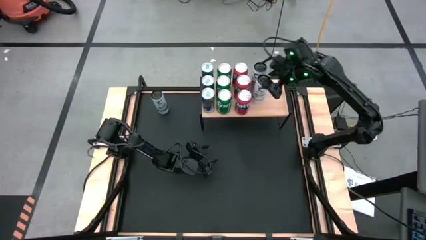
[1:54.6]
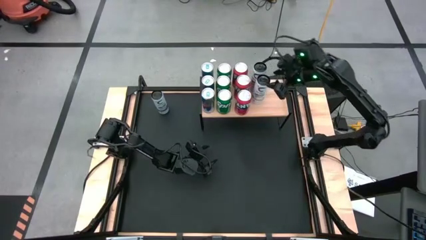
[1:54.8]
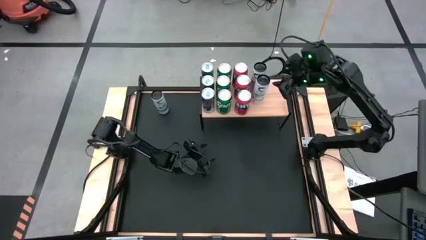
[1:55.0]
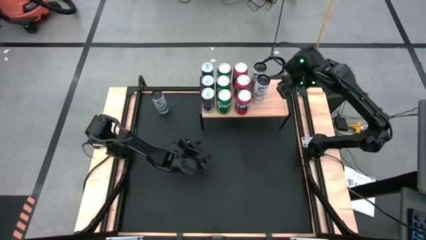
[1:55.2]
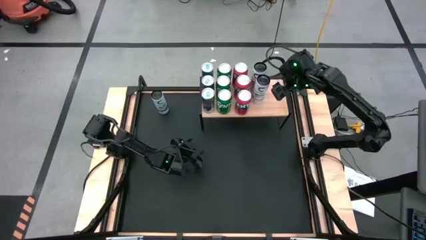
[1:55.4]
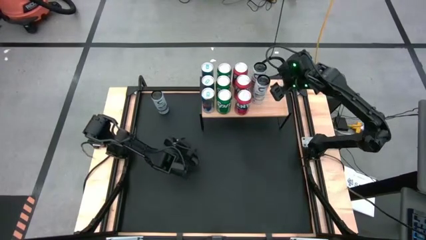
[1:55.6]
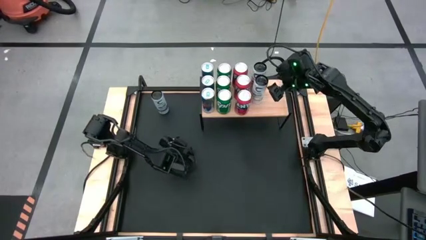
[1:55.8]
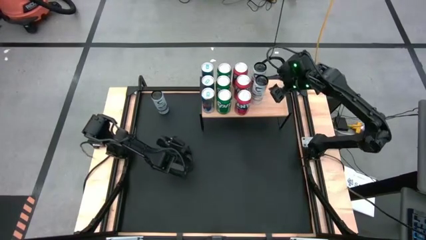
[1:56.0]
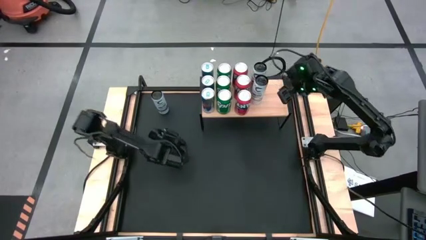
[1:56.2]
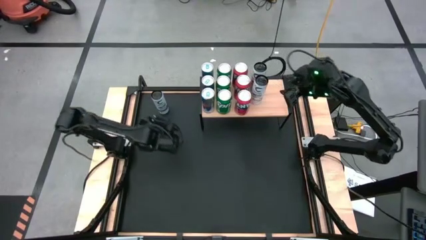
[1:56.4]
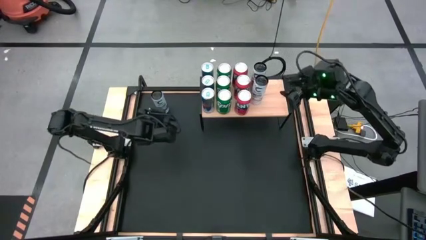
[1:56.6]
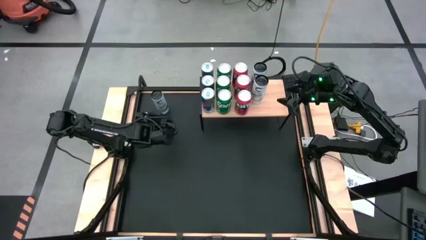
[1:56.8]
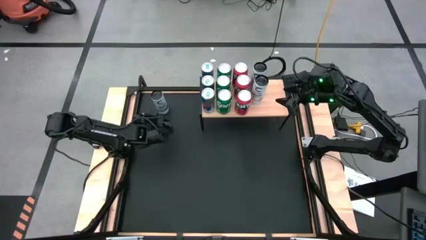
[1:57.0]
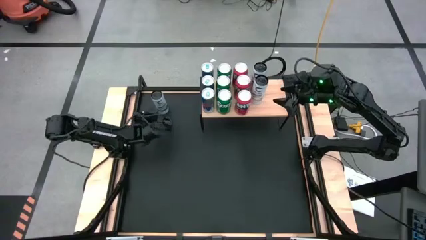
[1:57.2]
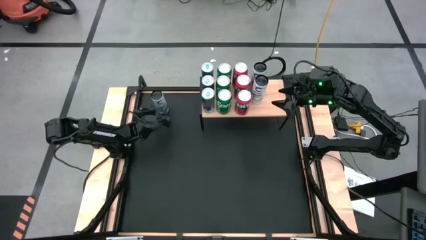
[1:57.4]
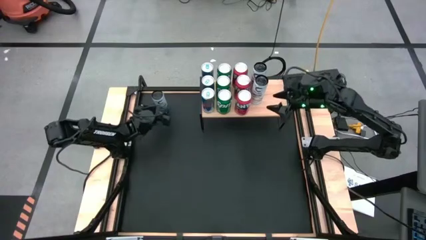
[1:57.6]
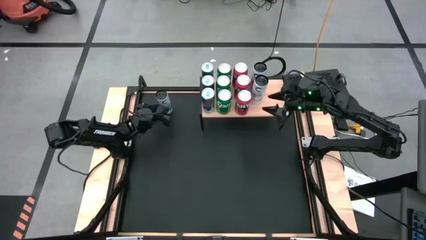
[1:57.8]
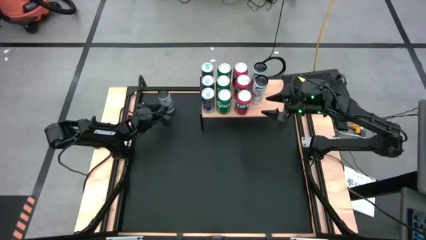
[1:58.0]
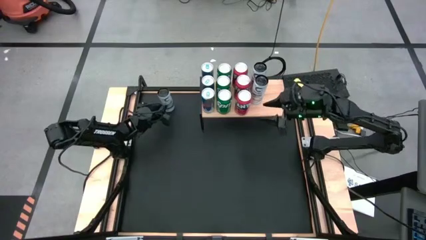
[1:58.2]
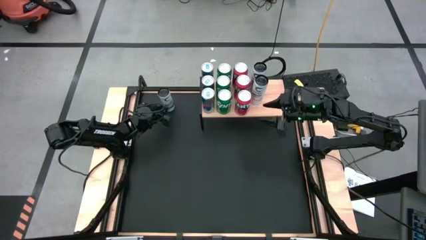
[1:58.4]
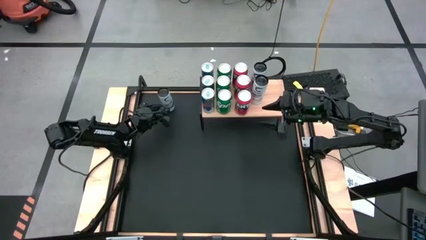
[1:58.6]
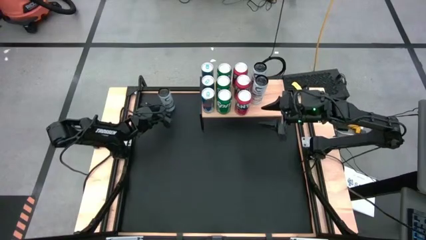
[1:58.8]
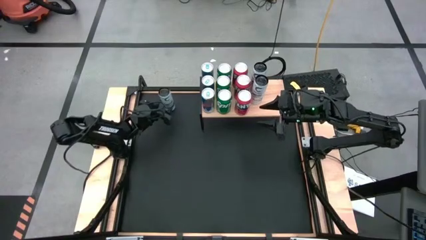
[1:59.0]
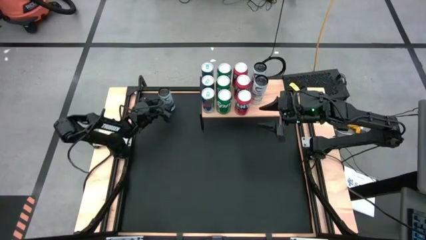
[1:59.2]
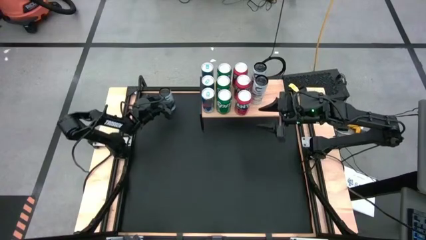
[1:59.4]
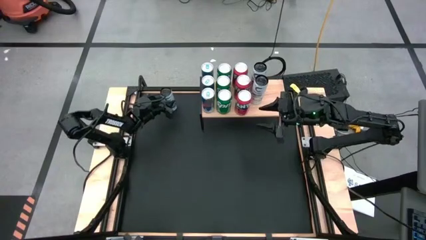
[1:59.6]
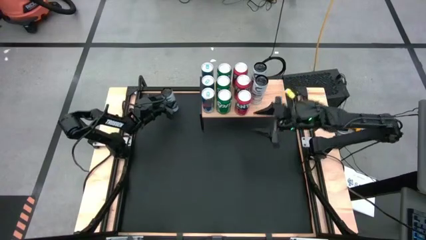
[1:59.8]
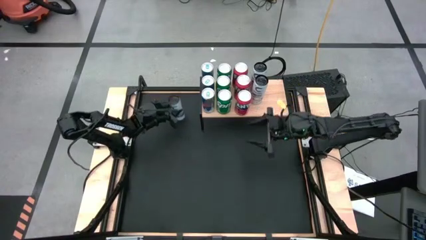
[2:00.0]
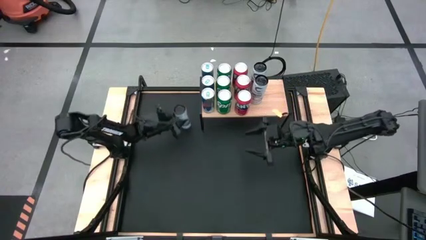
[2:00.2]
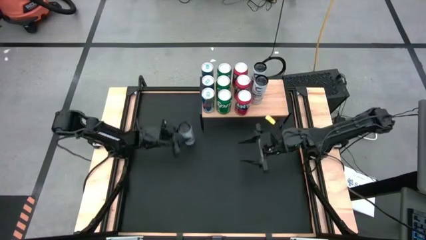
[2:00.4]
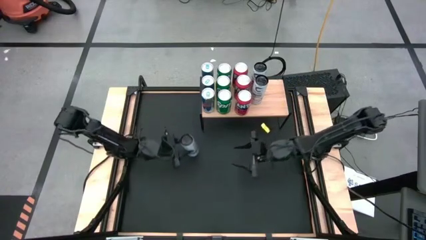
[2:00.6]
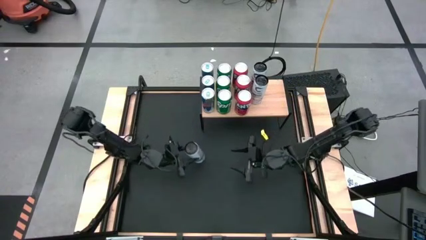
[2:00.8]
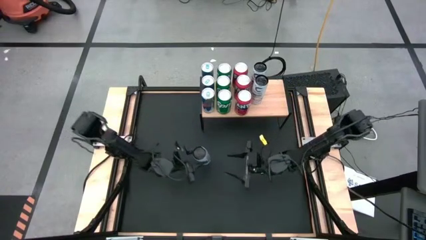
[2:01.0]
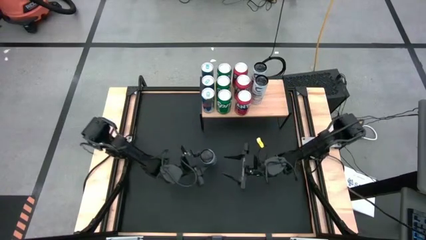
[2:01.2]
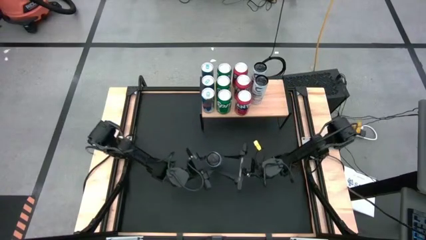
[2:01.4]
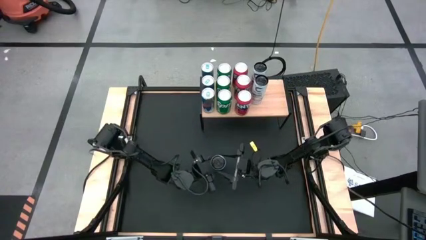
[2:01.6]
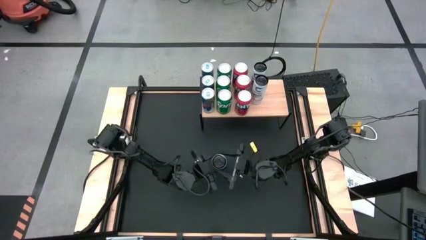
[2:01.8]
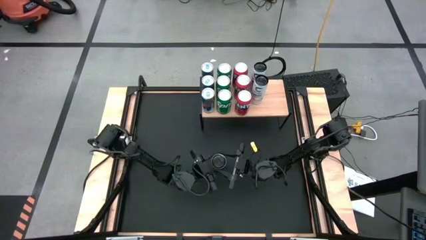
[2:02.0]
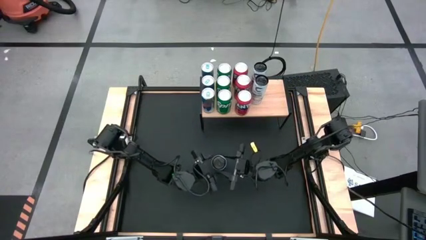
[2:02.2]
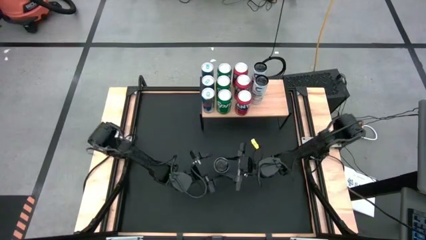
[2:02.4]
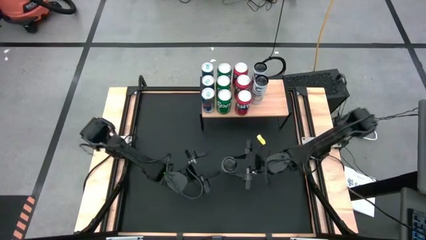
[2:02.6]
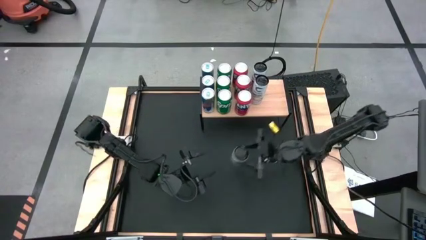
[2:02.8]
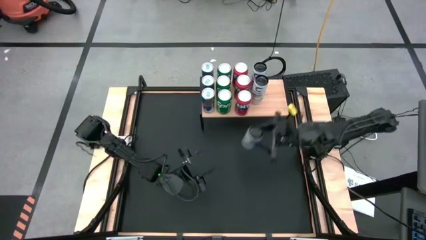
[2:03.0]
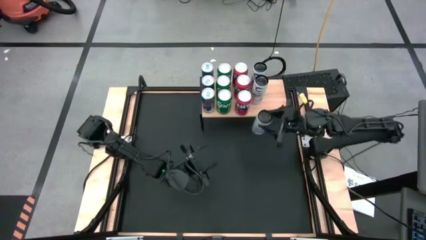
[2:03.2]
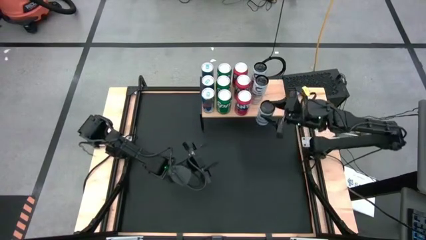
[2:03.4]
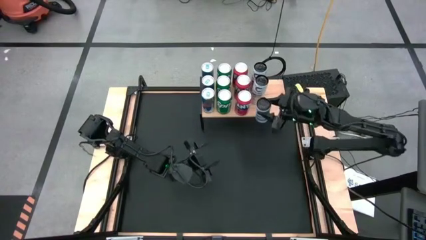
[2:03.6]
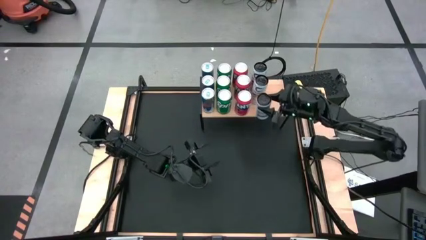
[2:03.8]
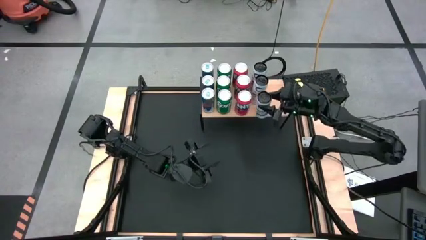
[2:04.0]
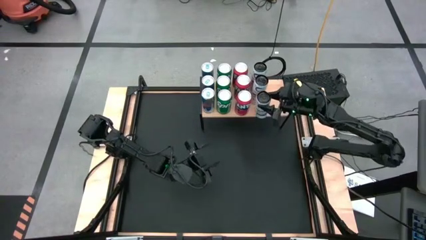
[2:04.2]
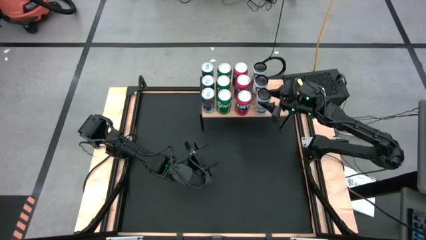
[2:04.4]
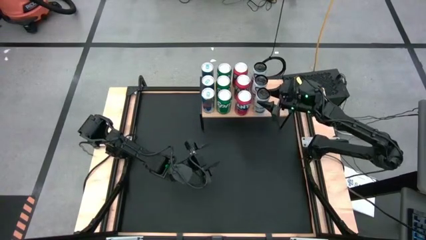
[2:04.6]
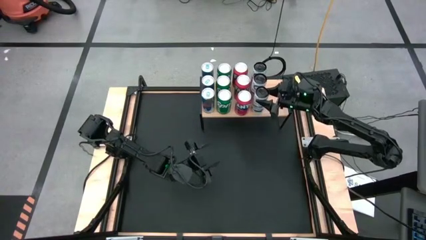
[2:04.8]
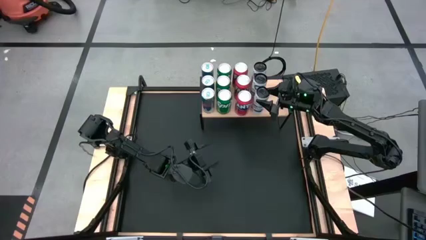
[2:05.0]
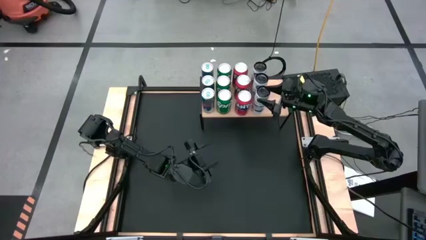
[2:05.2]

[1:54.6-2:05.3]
Task: Place canned beverage on shelf
Put the white blue soda can on the shelf aligned with the other white blue soda cans

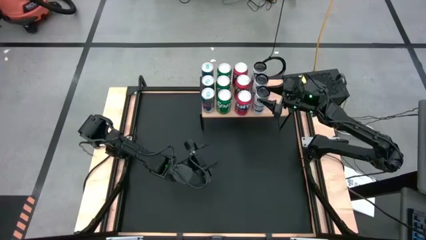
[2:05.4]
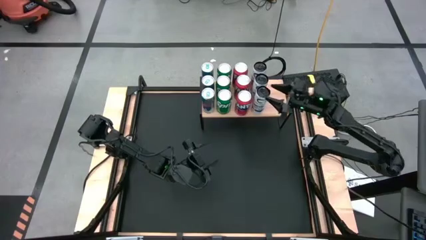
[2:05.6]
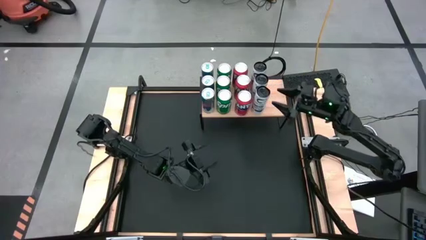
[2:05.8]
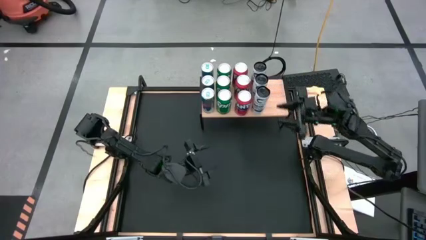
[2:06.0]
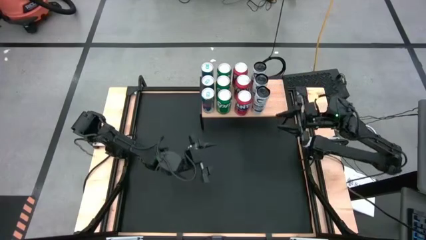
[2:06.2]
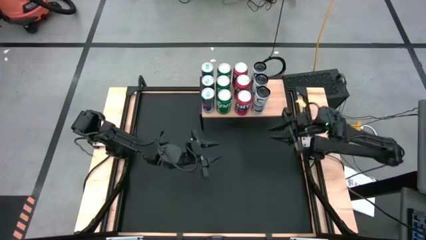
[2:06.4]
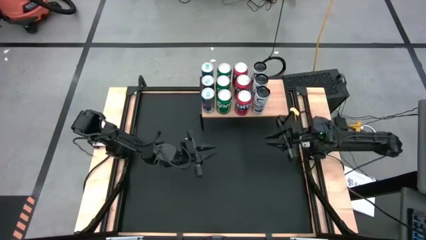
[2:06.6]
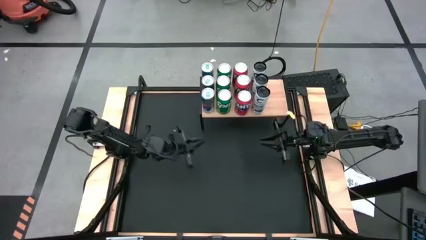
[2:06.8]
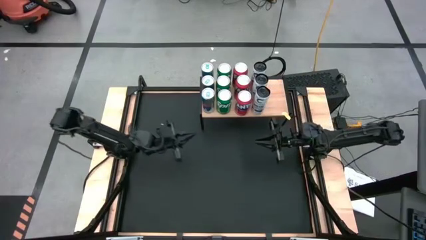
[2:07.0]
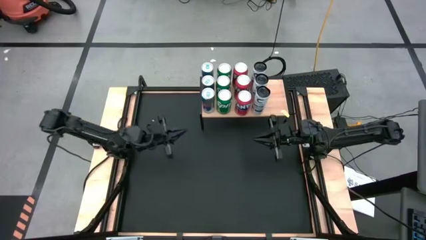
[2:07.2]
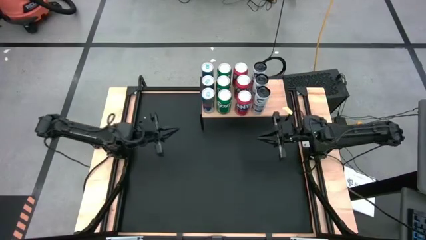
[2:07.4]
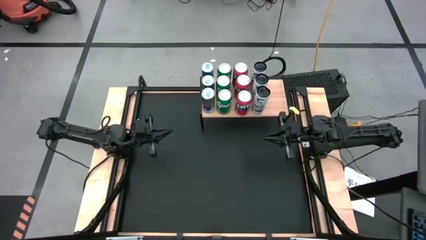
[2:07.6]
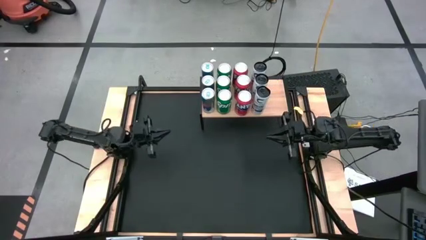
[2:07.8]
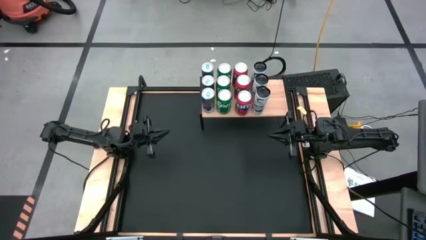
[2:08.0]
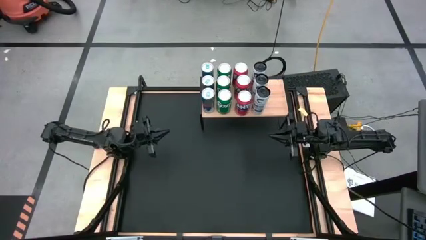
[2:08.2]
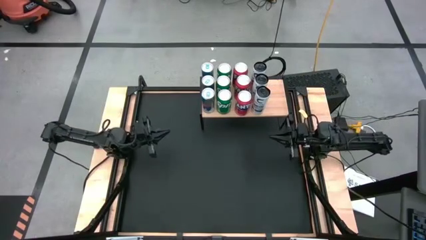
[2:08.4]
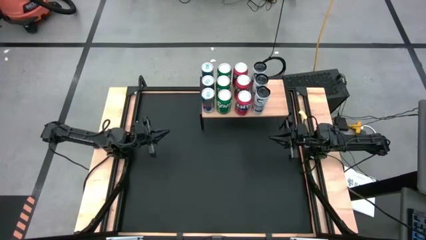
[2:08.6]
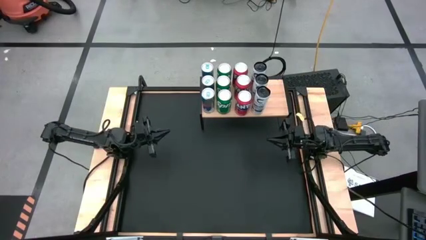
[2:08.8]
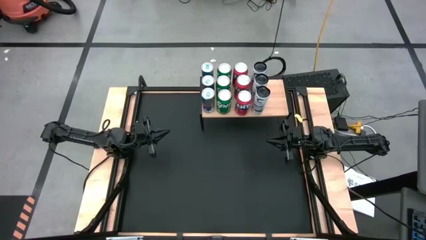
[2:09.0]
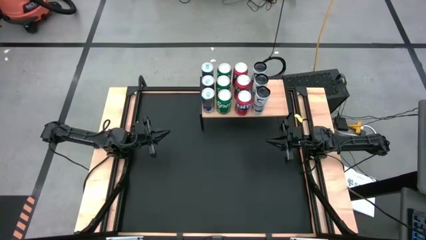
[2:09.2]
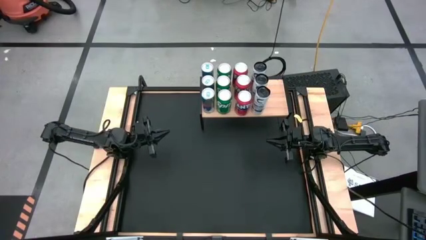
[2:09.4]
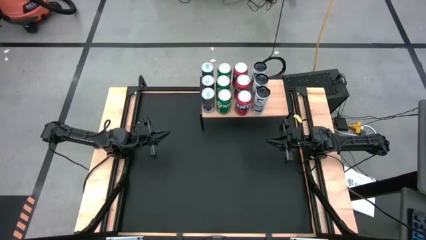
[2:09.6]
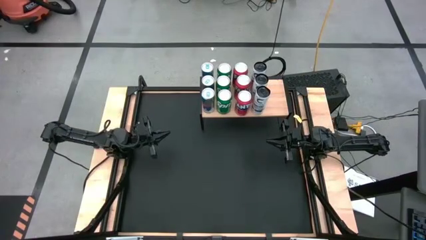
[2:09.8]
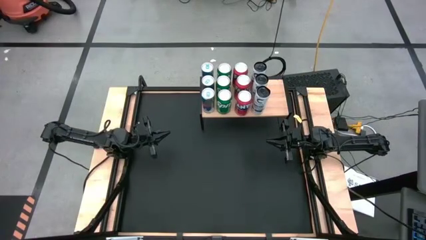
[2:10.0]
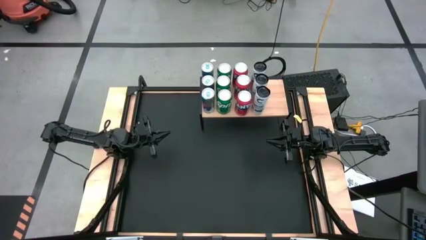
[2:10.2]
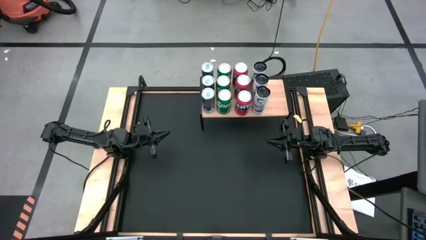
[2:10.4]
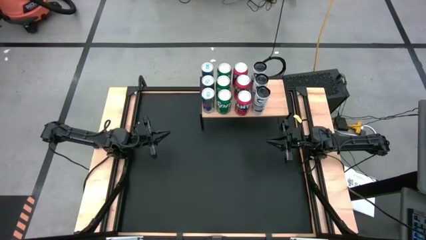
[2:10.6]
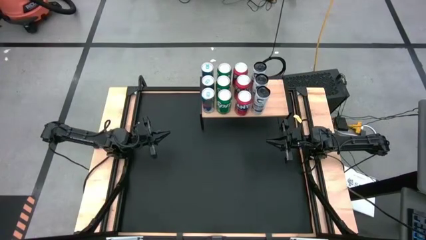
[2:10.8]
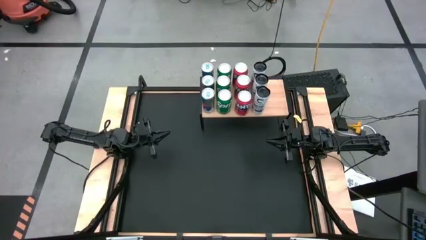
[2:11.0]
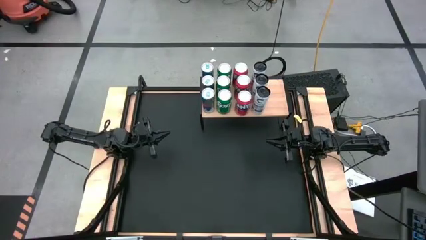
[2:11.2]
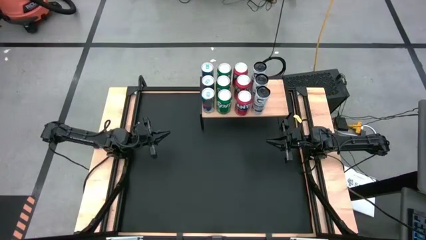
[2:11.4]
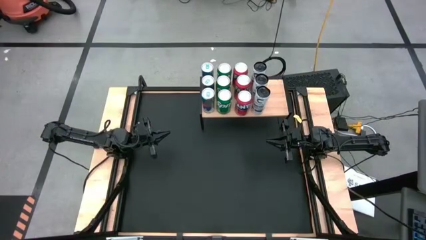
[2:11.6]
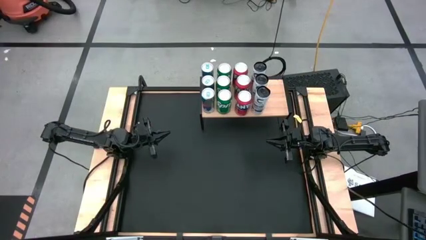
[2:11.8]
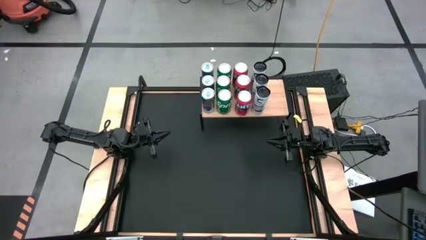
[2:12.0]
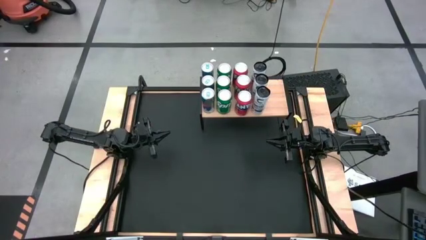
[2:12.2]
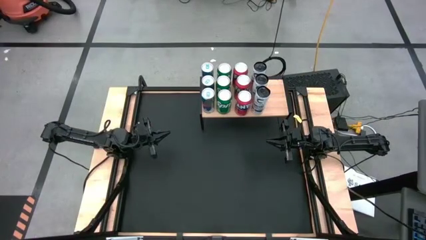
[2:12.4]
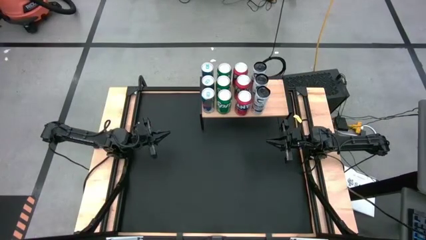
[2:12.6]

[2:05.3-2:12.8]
Return to Home Position
